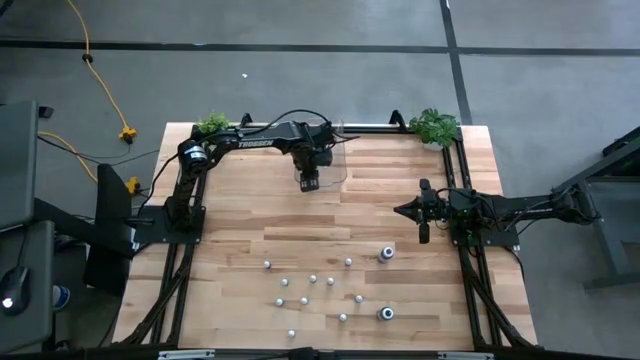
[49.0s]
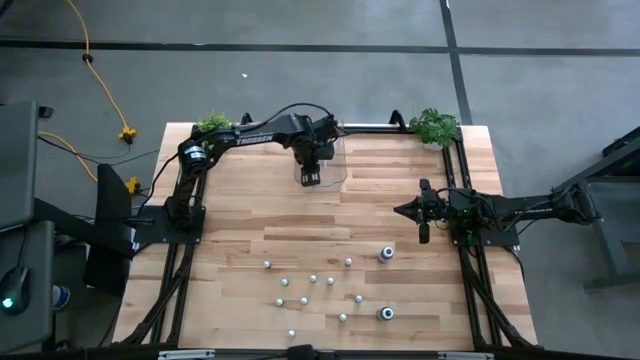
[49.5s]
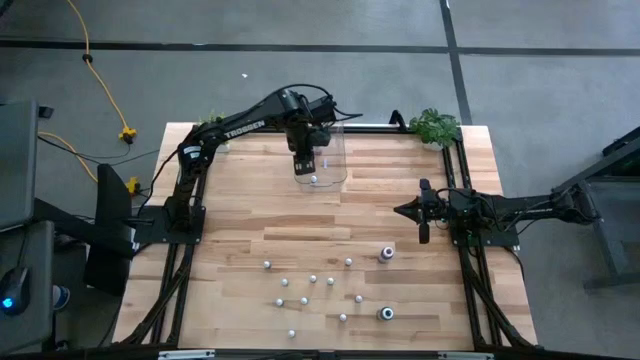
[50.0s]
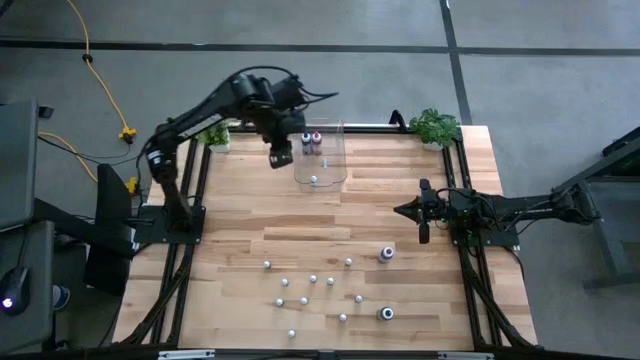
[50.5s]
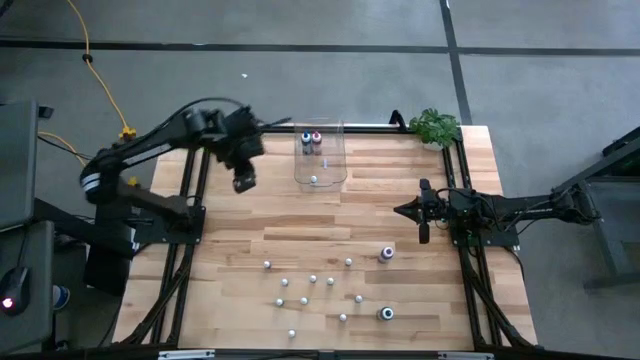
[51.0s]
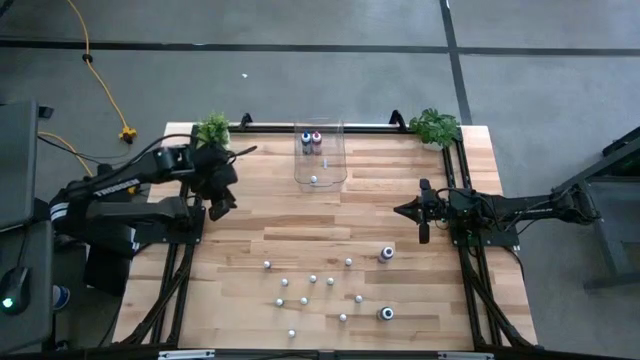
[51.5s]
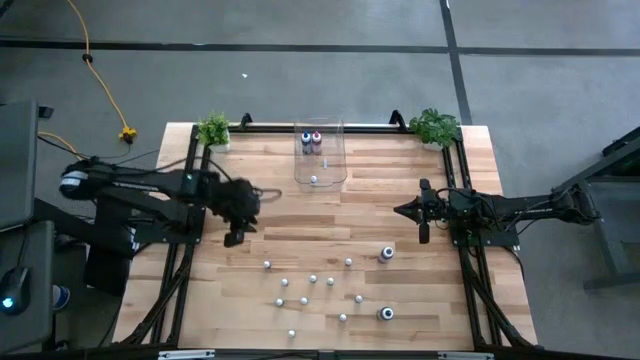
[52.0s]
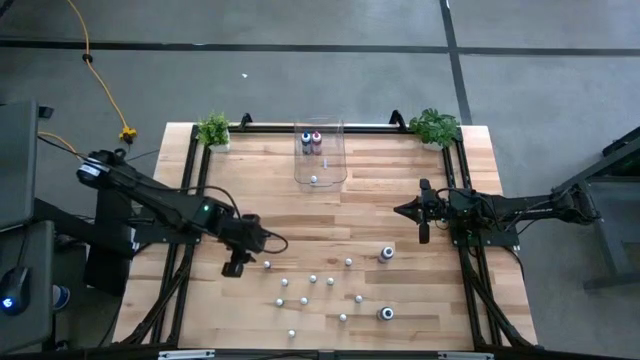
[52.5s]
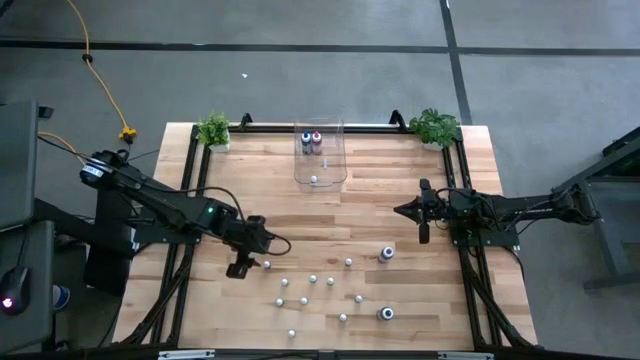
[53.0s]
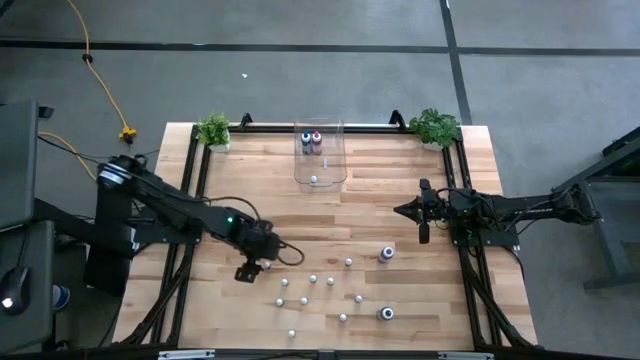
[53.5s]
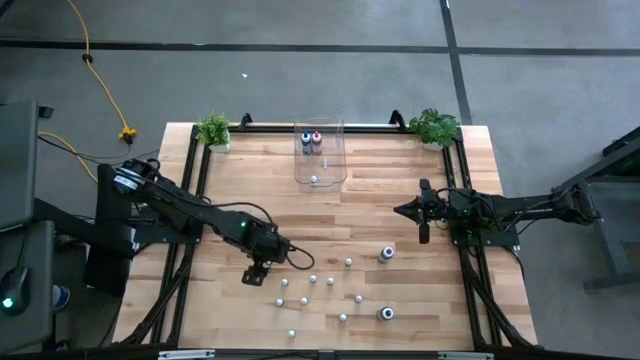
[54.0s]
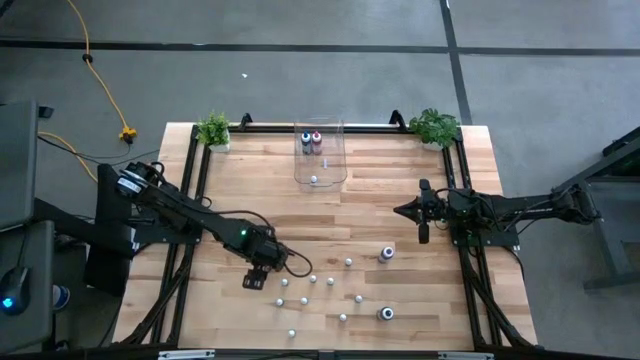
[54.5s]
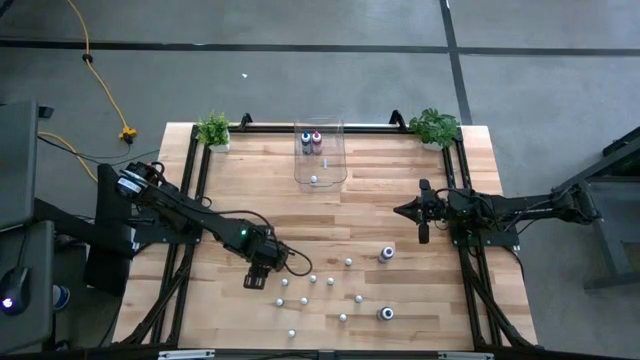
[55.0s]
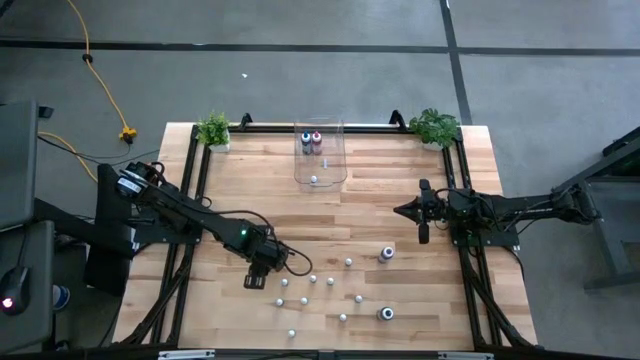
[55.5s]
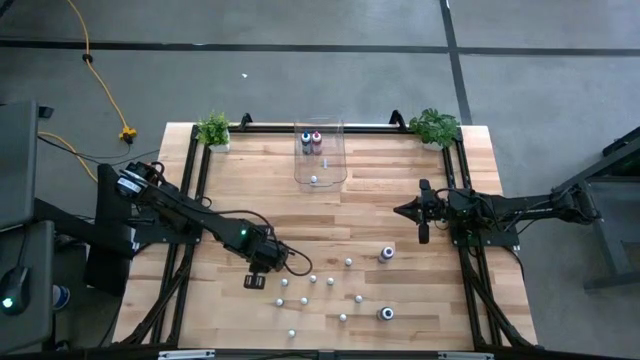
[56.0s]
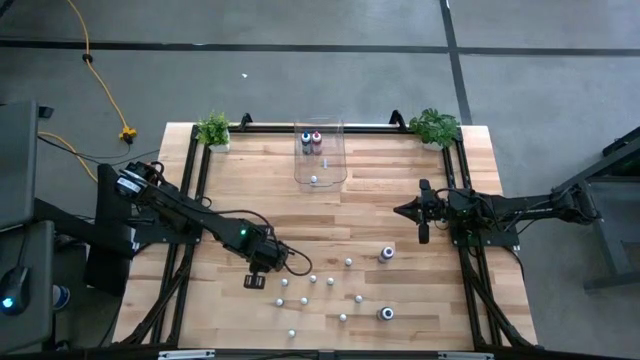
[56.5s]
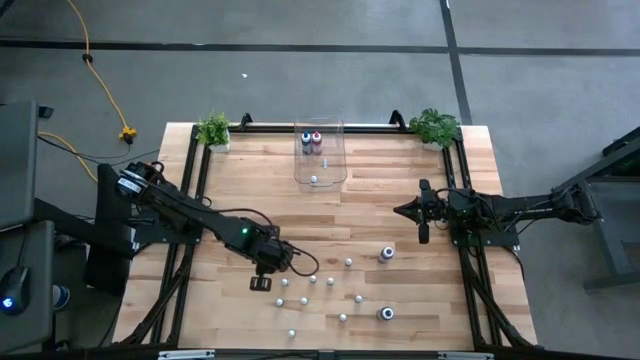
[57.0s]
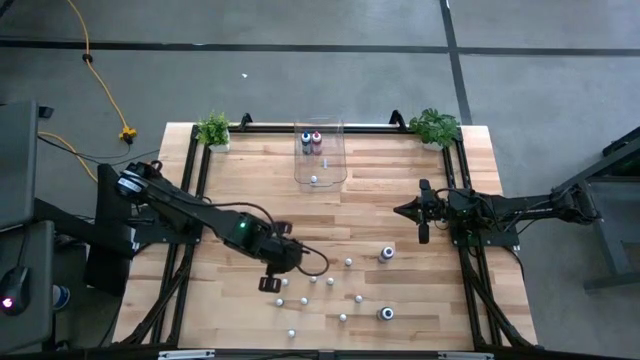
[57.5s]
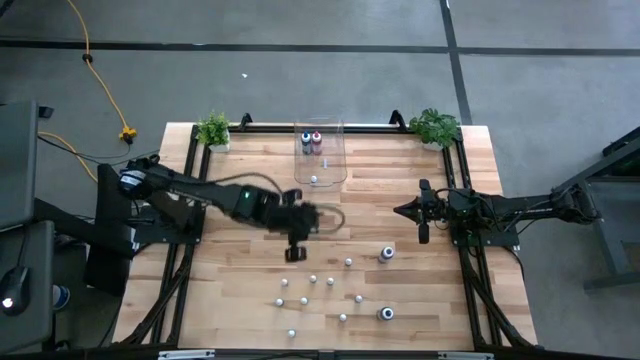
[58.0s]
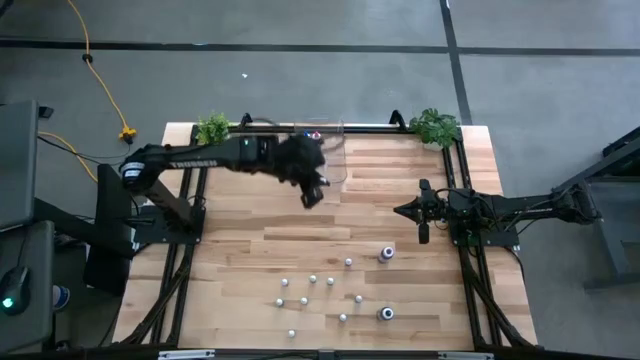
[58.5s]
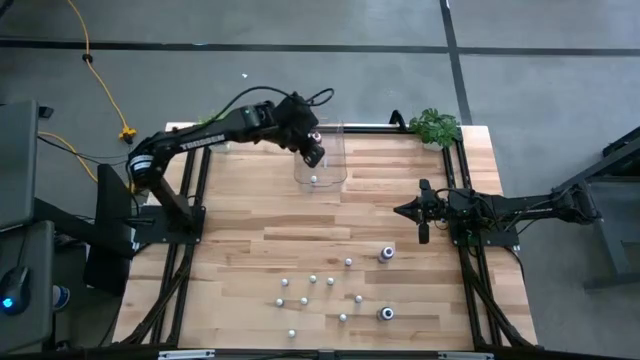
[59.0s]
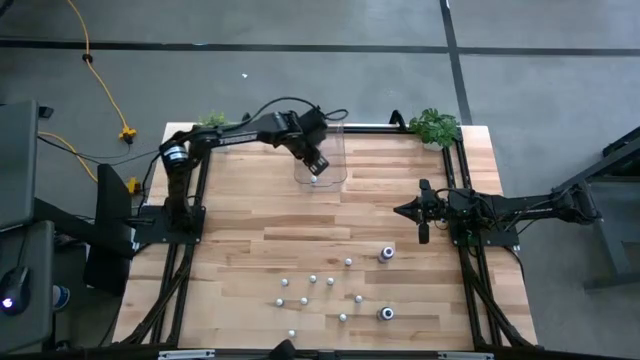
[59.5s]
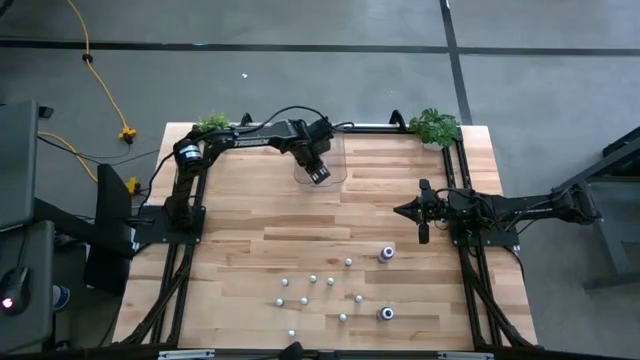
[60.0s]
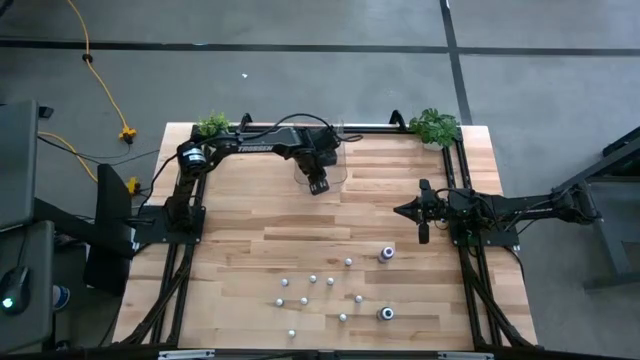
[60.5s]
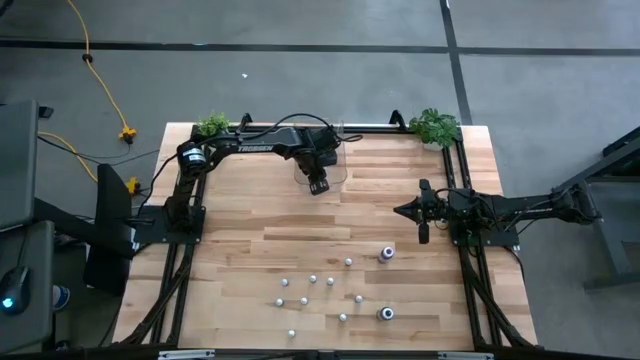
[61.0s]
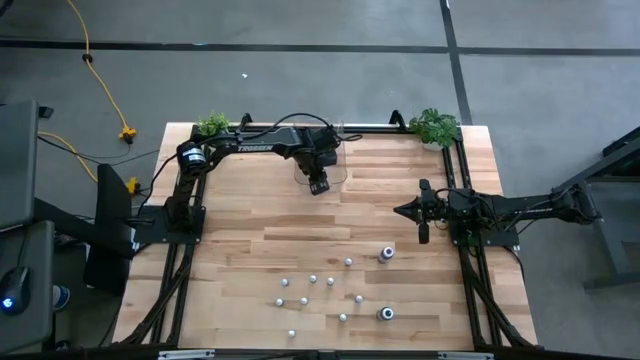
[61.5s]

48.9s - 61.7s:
Task: Pick & Place food coloring
Put the small brown food coloring into the transparent bin

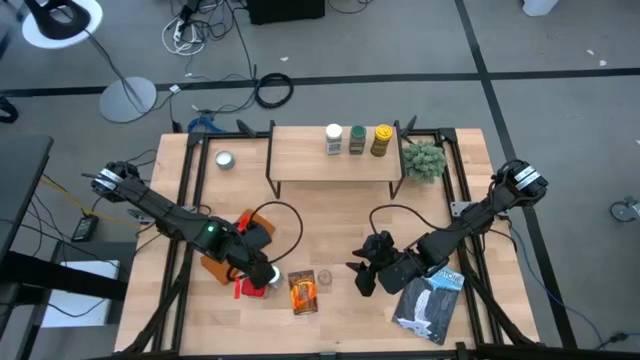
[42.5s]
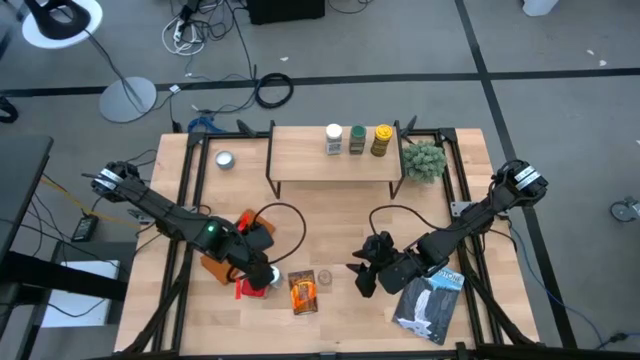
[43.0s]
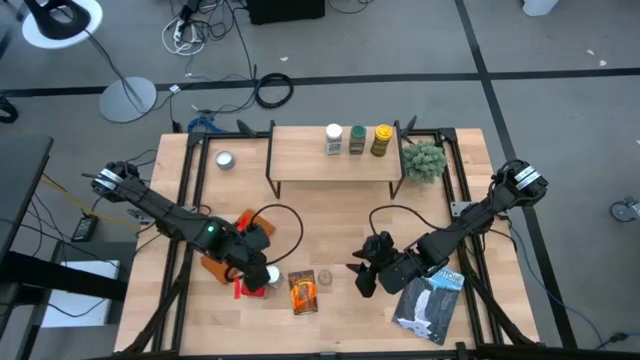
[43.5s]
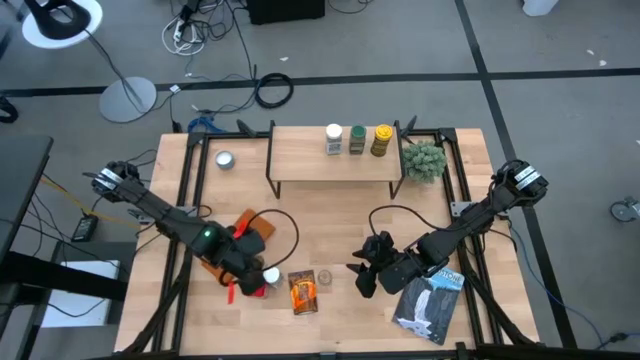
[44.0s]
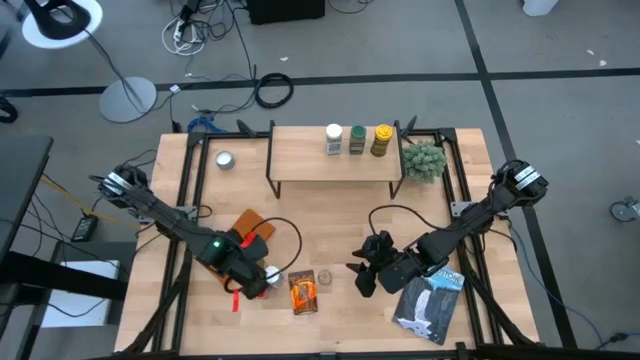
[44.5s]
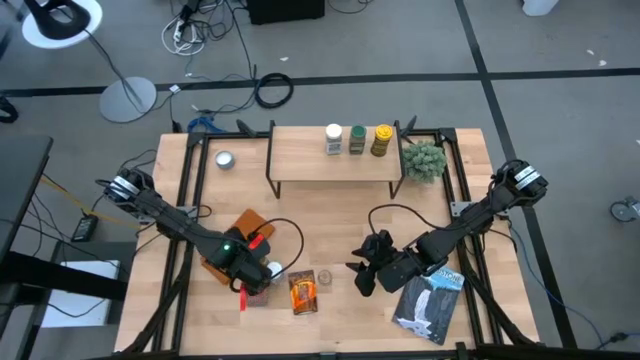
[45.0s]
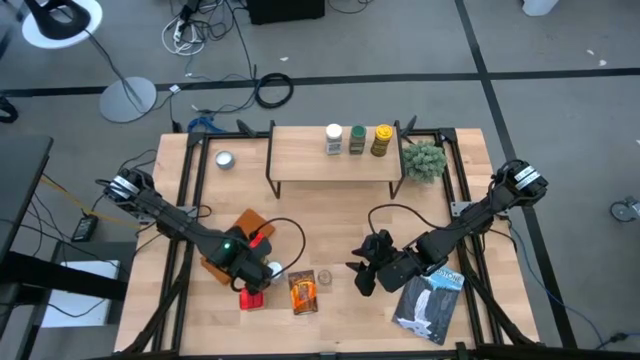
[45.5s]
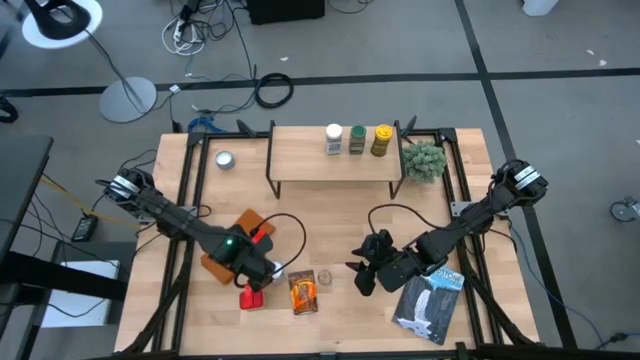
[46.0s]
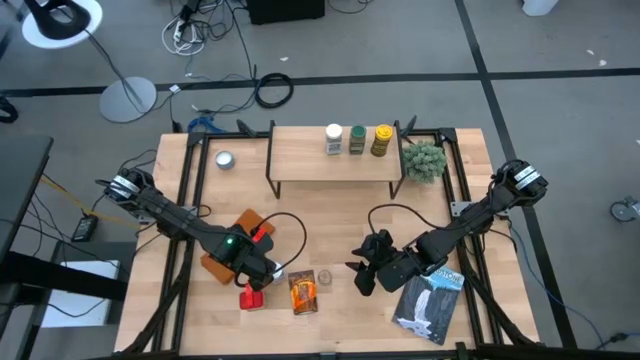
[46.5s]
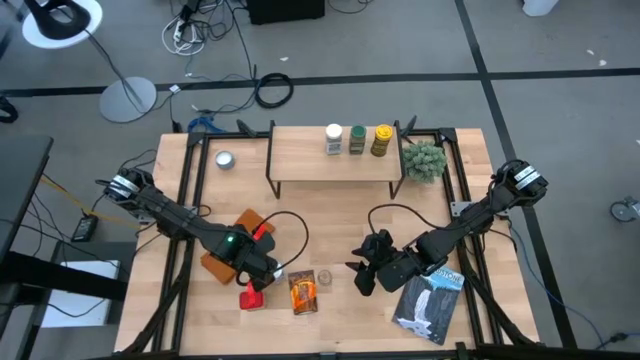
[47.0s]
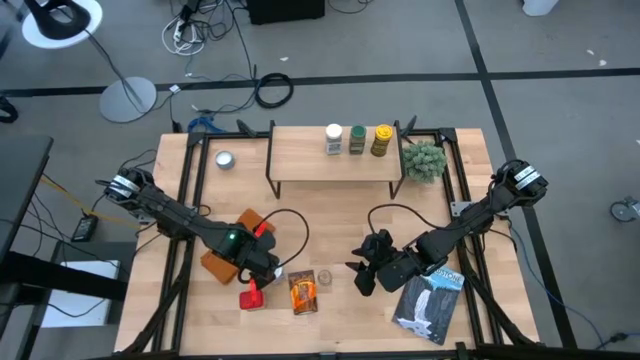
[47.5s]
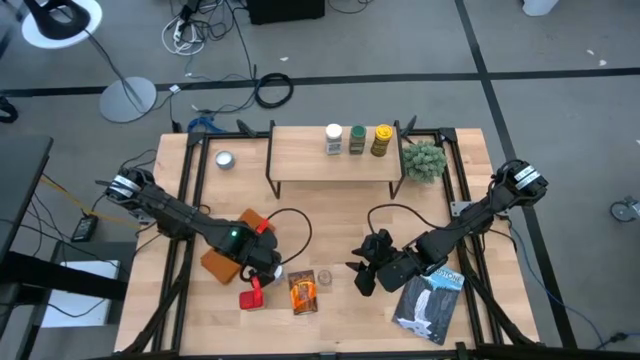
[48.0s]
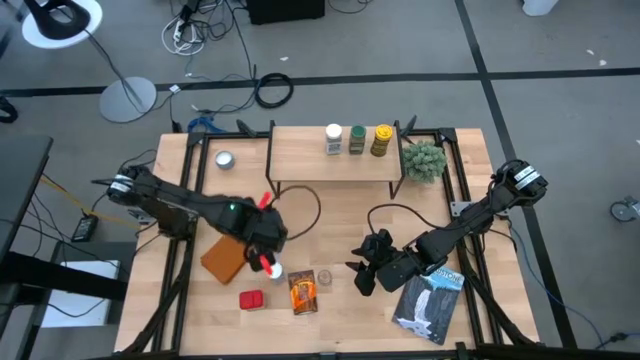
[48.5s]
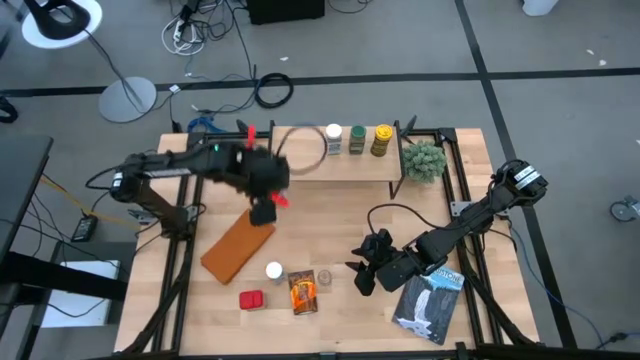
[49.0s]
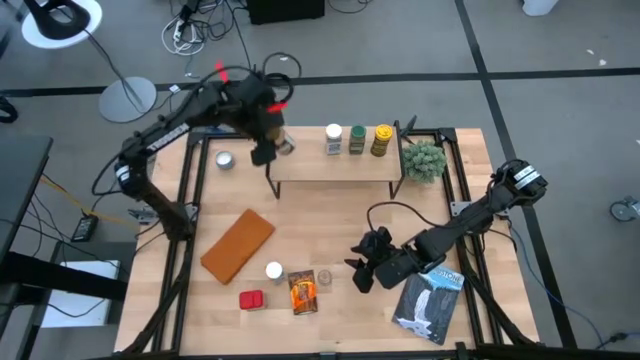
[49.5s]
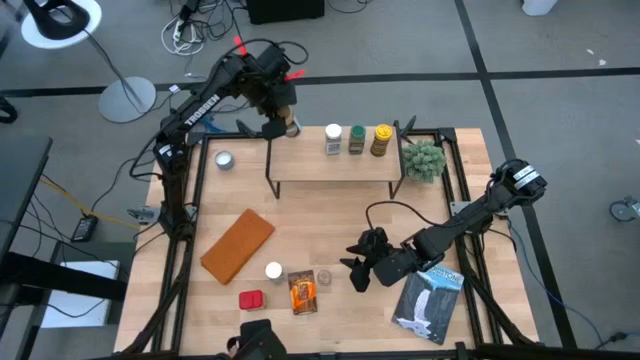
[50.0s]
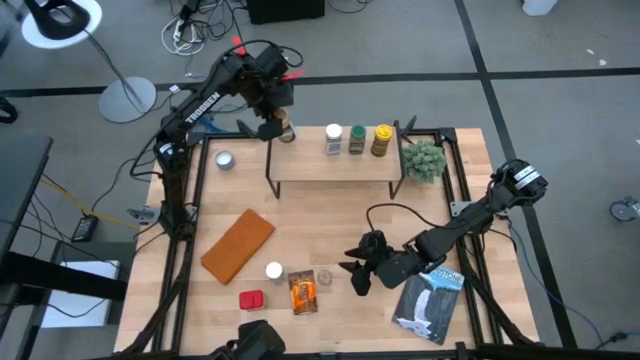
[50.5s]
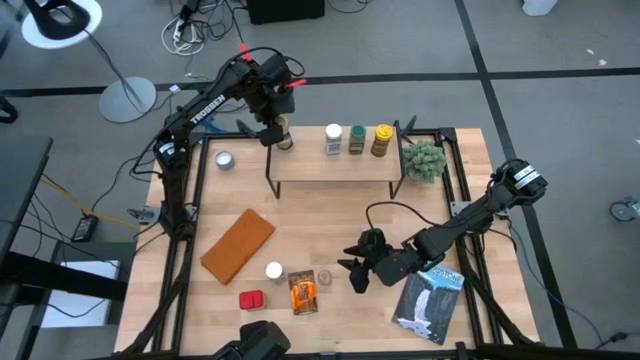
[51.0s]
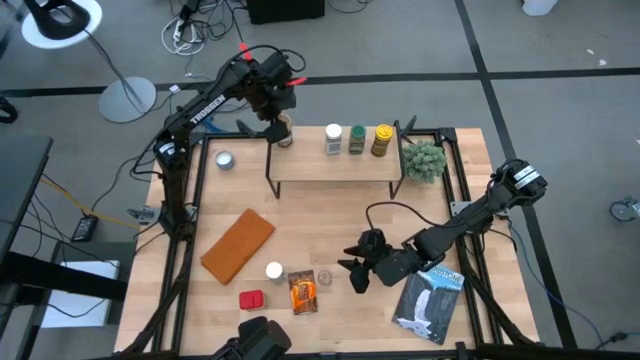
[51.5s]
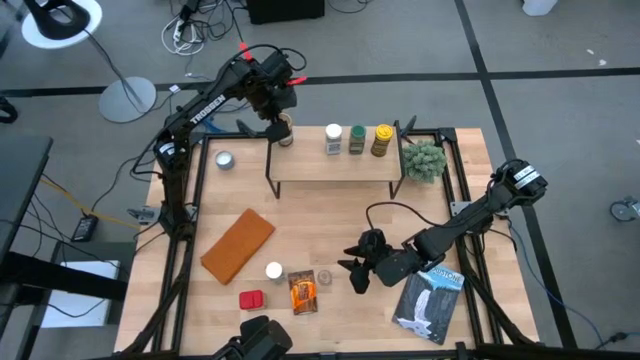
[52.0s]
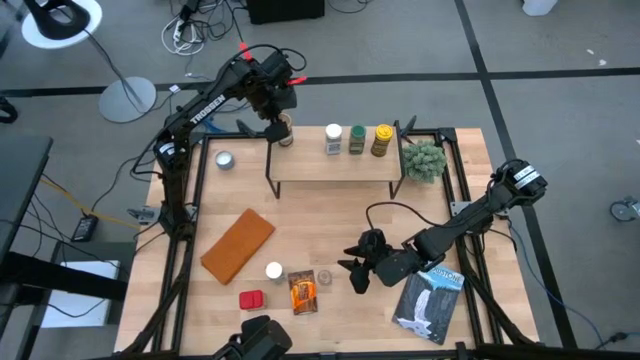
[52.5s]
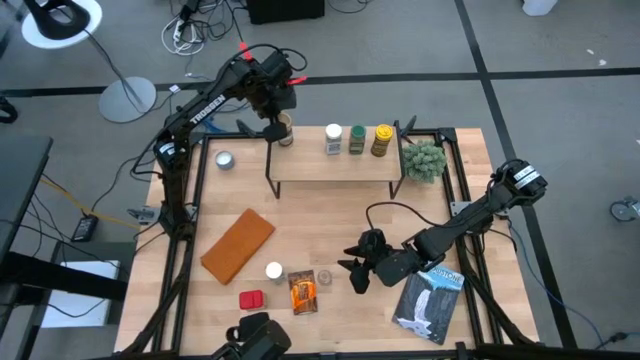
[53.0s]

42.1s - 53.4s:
Task: Shelf spices
Put the brown seasoning bottle on the shelf
